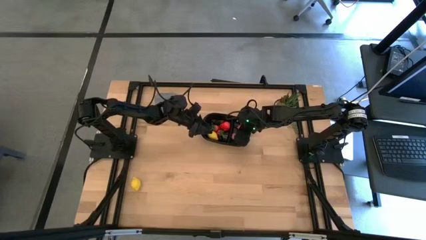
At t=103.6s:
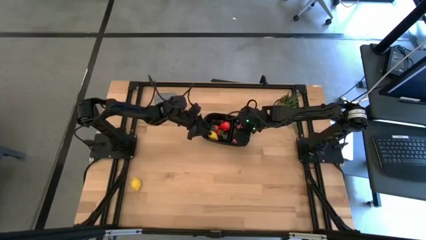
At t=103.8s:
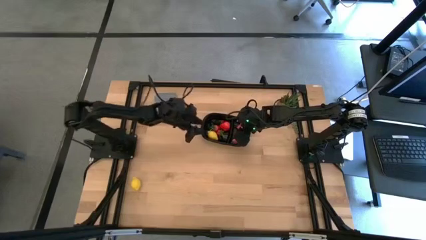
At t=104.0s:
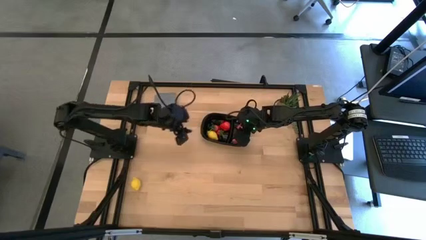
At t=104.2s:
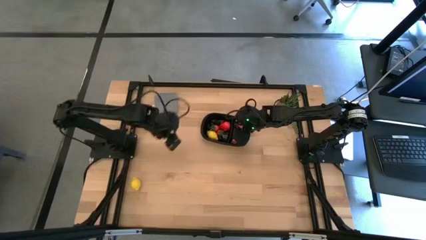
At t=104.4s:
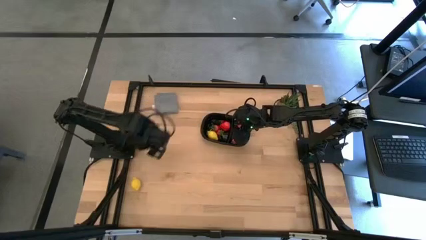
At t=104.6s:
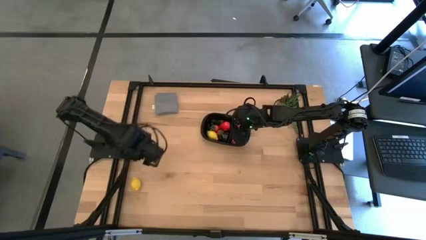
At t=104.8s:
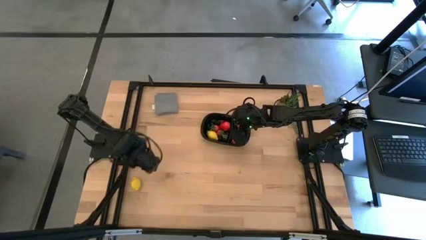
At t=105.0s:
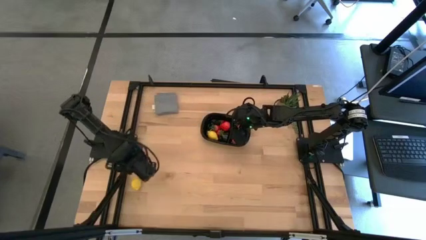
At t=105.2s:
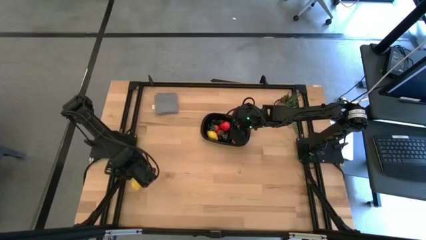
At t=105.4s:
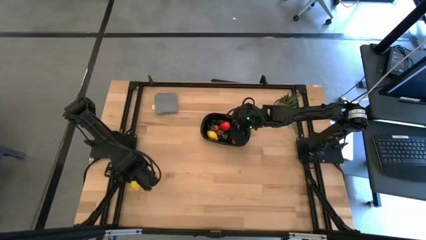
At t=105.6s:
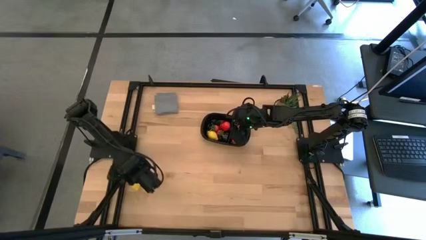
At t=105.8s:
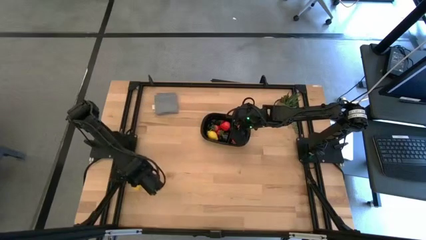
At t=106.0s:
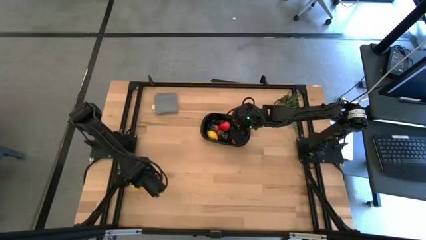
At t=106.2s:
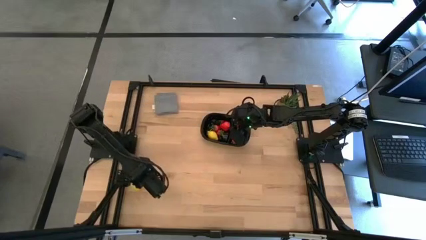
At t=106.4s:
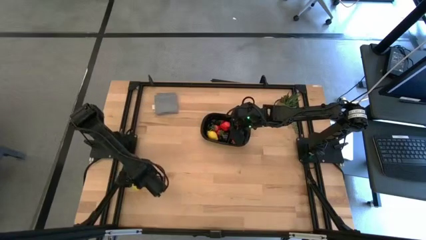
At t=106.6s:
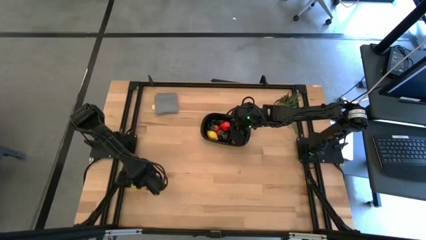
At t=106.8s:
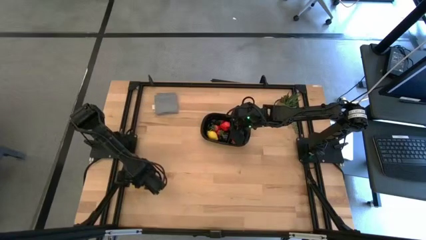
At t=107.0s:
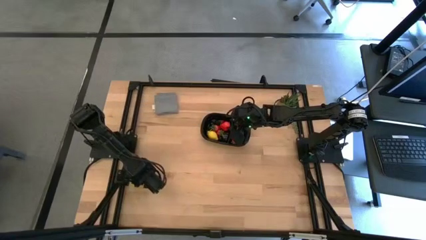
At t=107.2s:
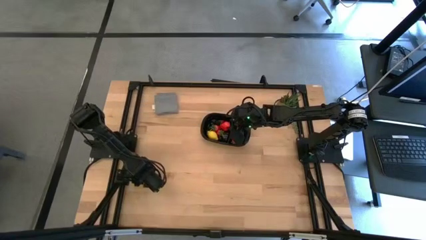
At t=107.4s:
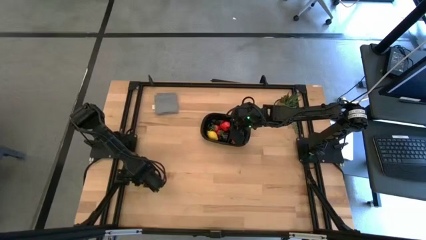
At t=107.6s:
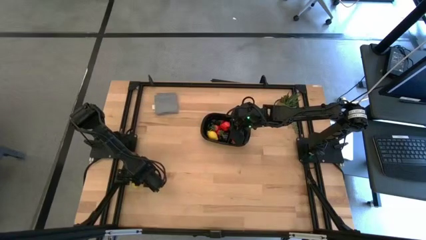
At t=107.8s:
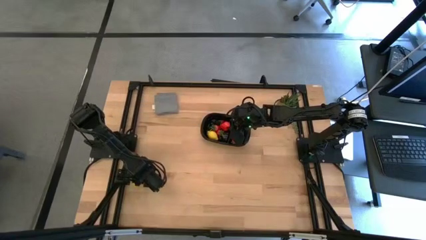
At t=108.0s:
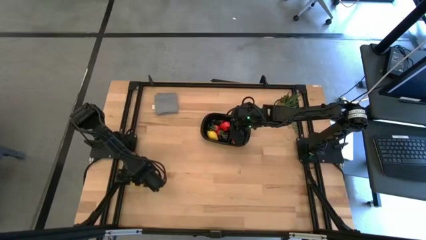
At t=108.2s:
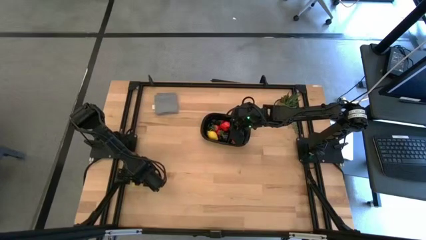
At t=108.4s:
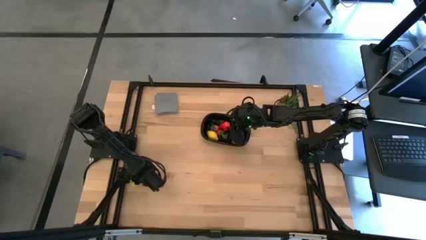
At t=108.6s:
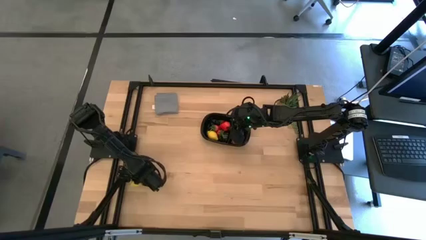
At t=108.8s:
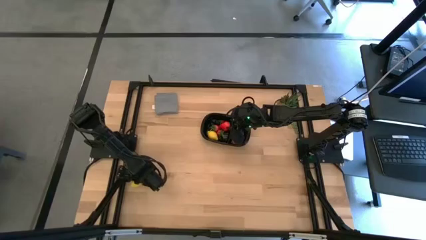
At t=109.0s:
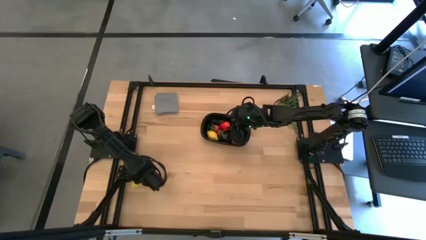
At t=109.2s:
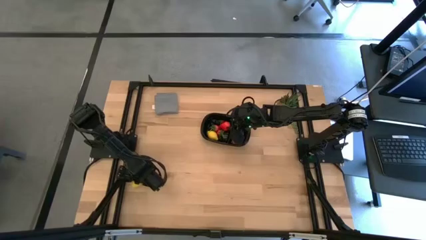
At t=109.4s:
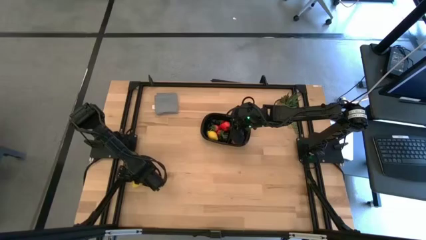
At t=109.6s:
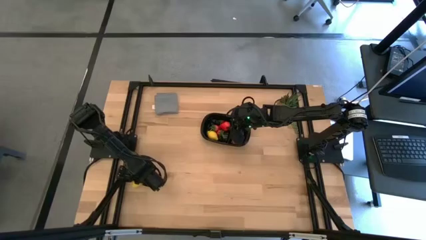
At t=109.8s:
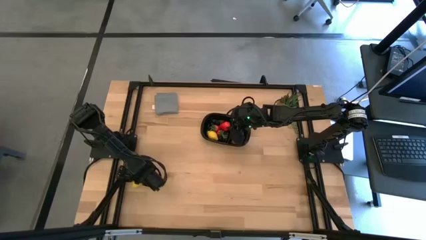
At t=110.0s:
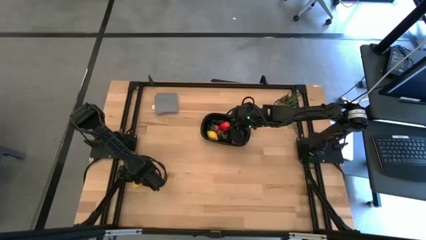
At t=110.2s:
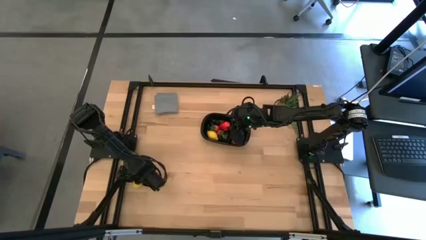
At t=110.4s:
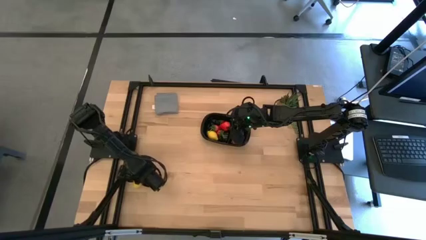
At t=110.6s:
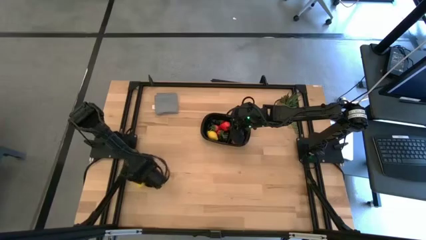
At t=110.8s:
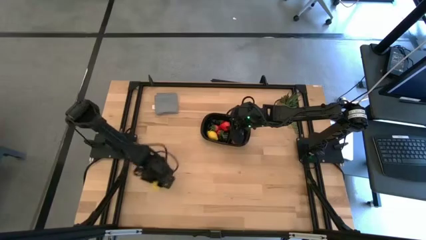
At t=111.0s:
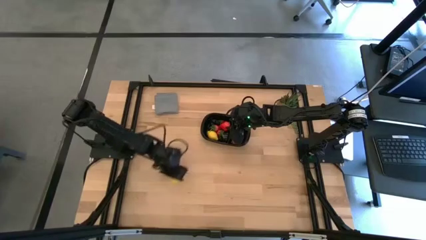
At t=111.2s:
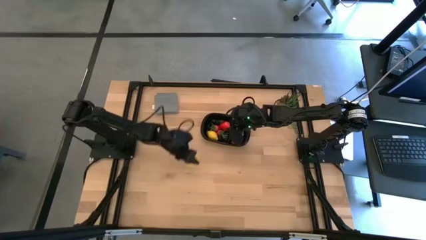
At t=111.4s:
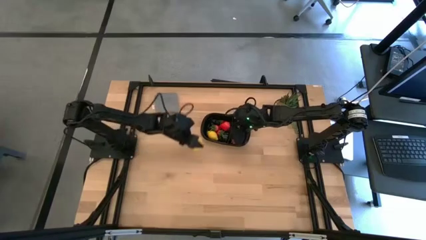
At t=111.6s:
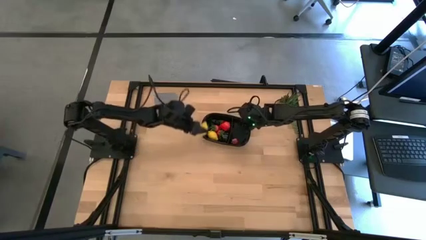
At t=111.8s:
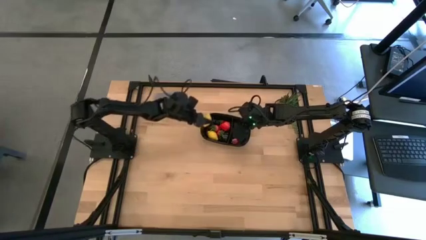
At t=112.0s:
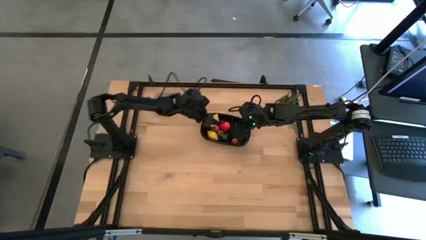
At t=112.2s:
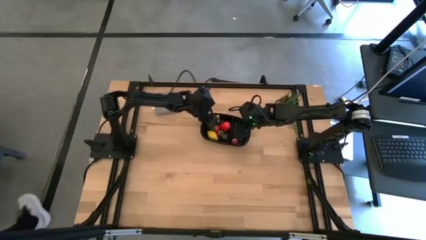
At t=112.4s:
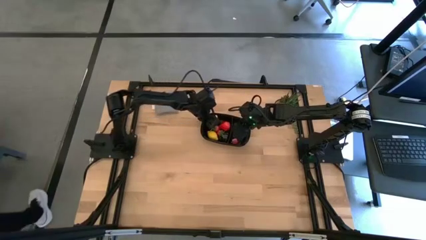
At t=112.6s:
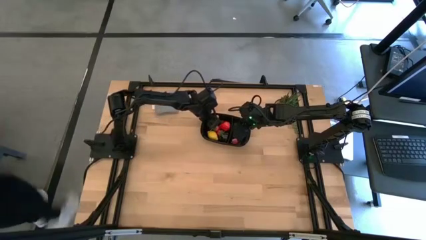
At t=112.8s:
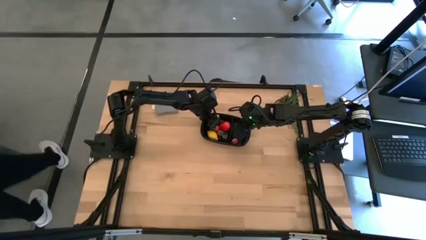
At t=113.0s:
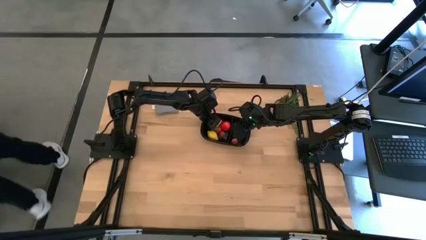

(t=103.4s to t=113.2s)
Task: Pick and placing Produce into tupperware
Put the yellow lemon into the black container

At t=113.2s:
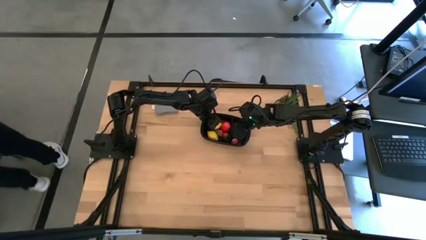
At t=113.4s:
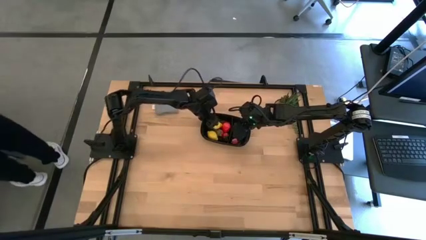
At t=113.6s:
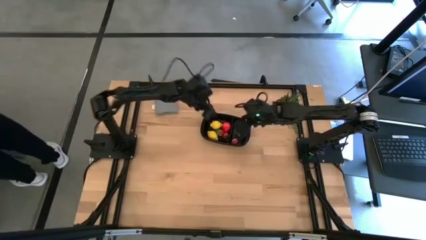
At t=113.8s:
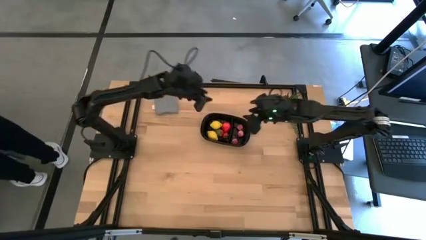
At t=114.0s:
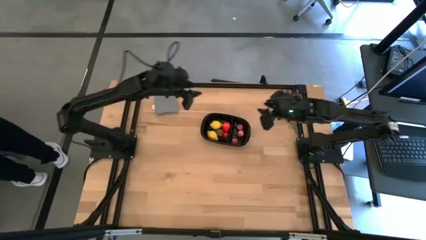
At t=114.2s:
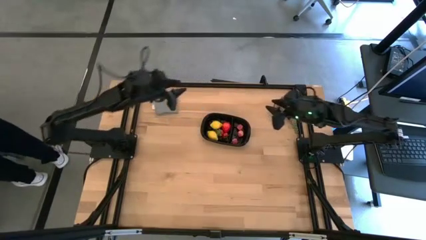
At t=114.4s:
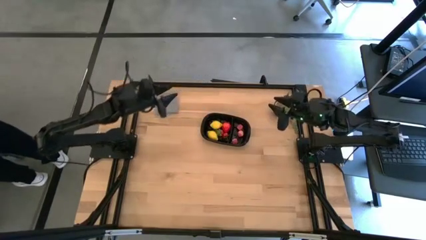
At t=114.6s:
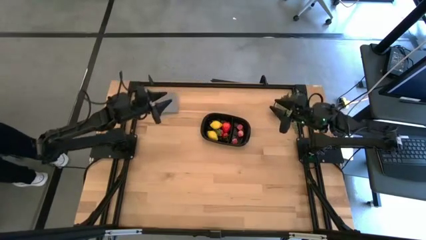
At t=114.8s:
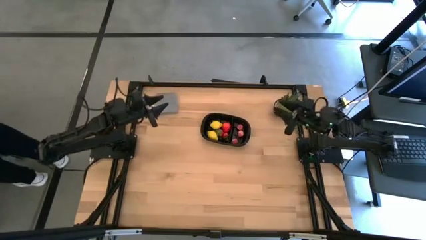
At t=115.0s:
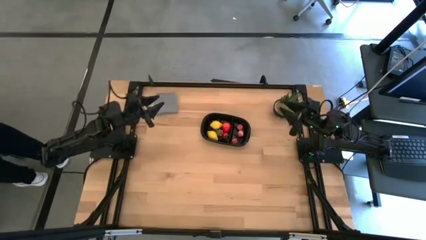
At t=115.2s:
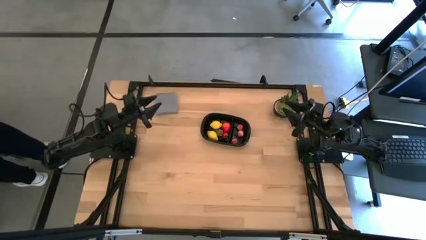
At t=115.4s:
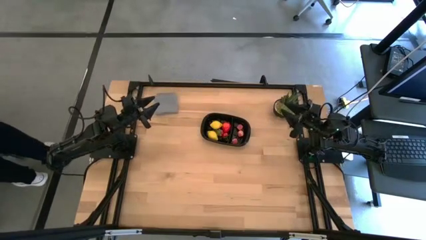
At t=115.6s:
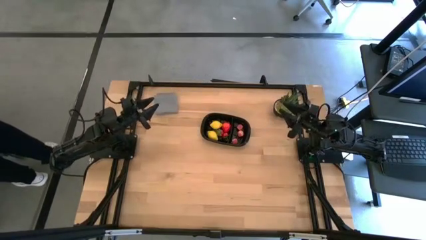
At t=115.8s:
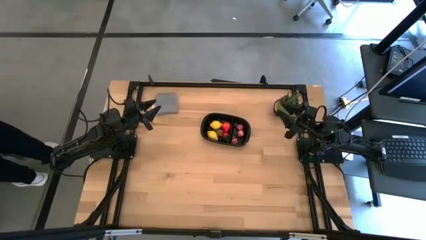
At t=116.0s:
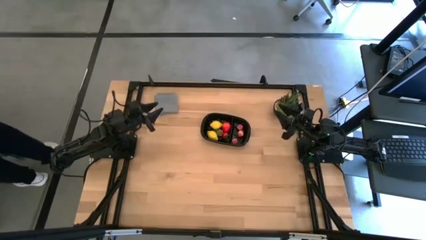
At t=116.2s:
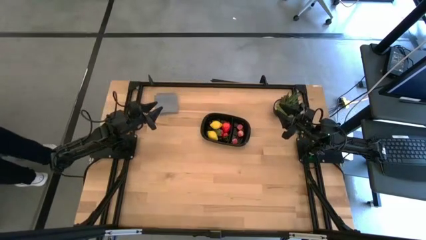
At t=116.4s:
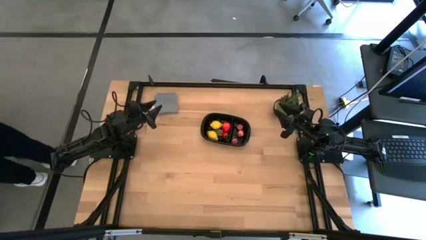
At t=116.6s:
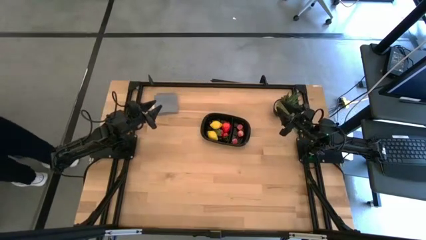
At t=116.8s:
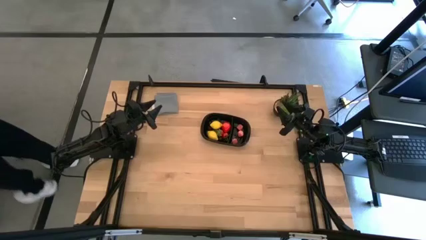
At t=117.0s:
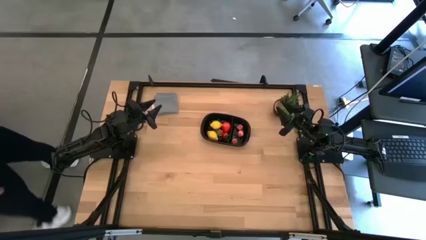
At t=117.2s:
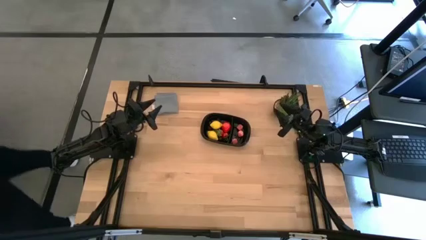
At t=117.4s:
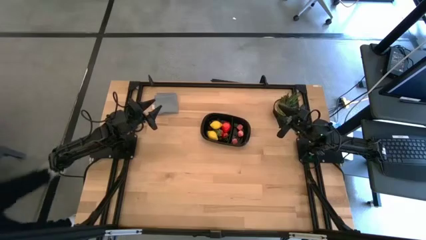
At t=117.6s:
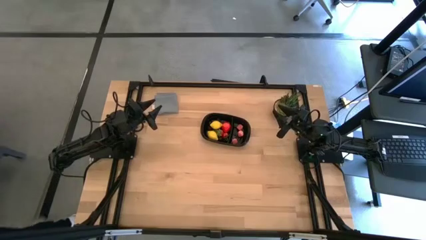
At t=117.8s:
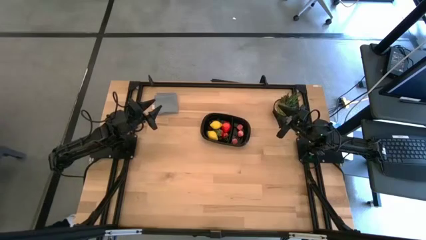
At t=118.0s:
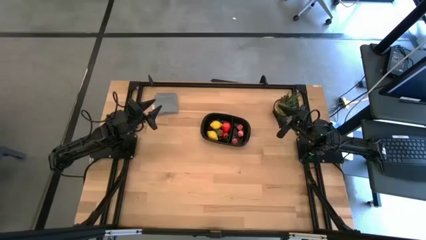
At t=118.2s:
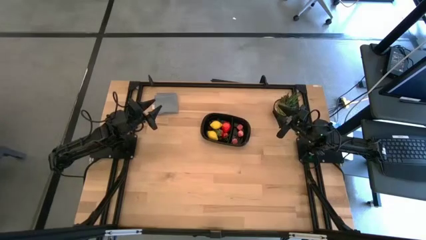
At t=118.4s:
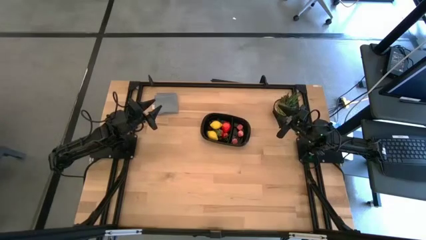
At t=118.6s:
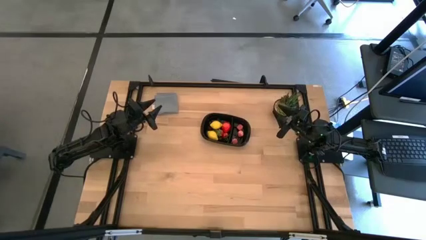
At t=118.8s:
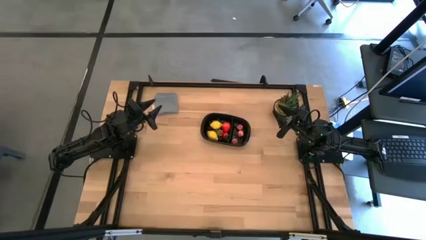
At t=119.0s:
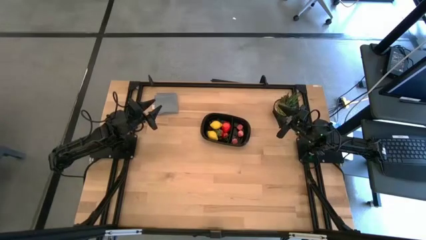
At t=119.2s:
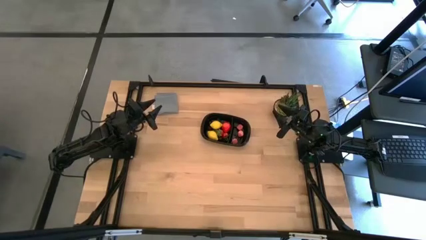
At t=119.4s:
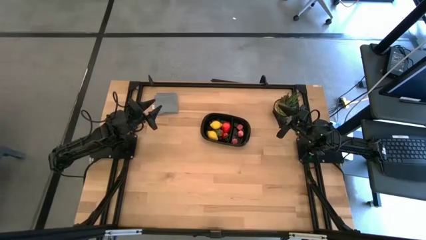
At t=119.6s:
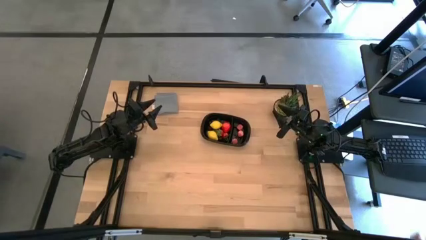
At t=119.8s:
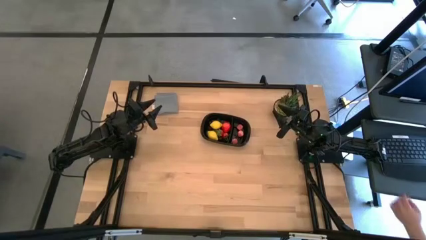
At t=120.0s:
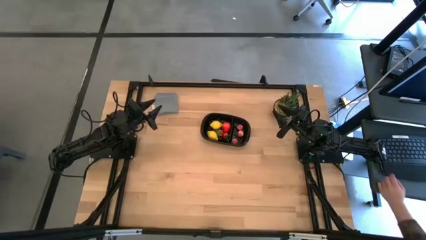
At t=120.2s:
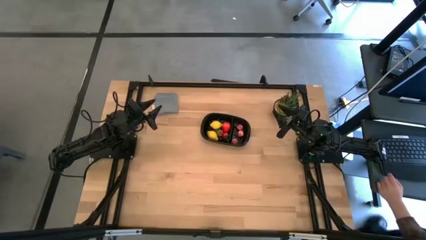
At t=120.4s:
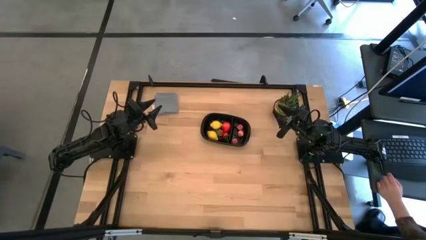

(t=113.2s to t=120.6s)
Return to Home Position
